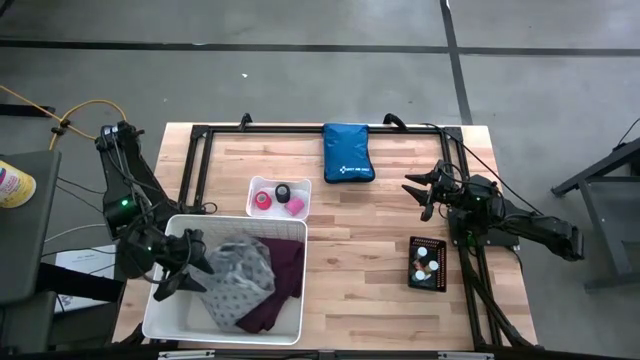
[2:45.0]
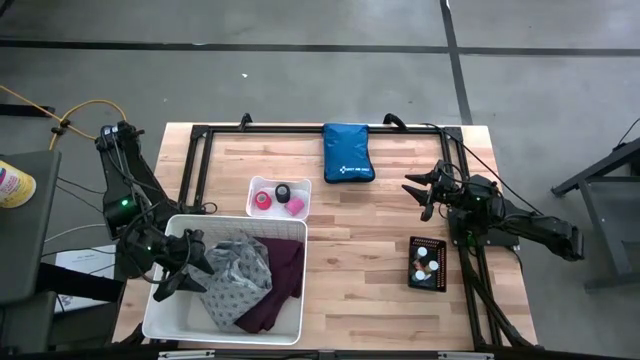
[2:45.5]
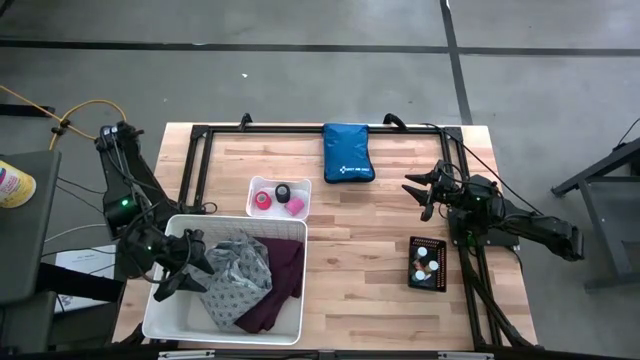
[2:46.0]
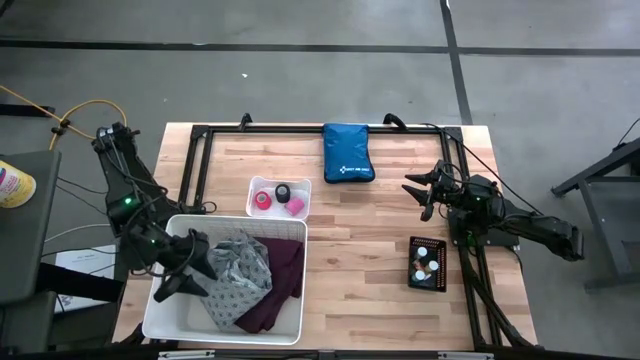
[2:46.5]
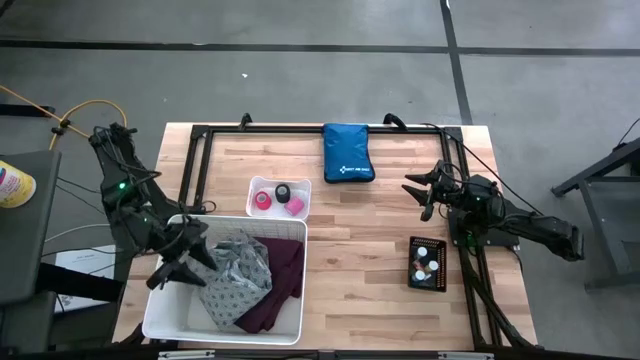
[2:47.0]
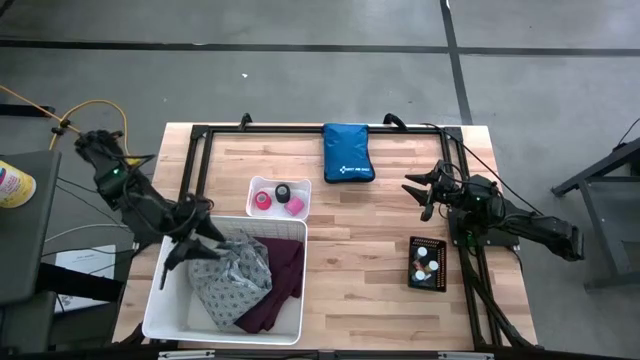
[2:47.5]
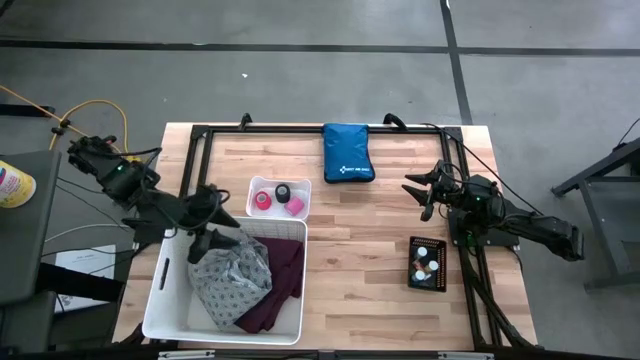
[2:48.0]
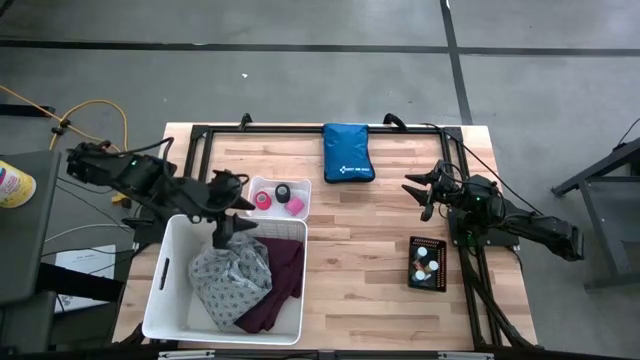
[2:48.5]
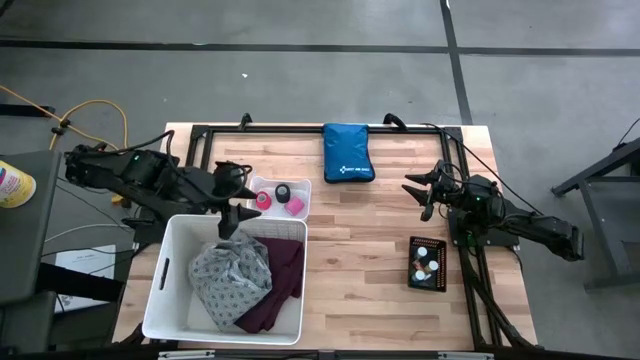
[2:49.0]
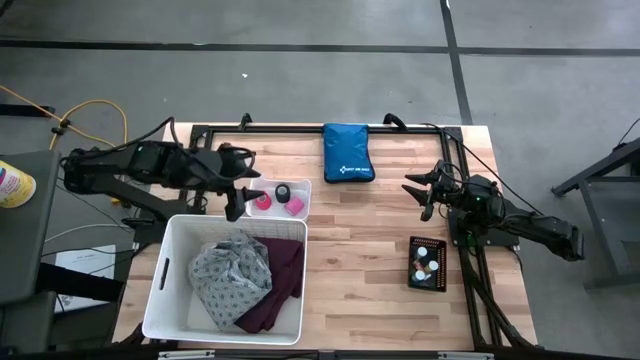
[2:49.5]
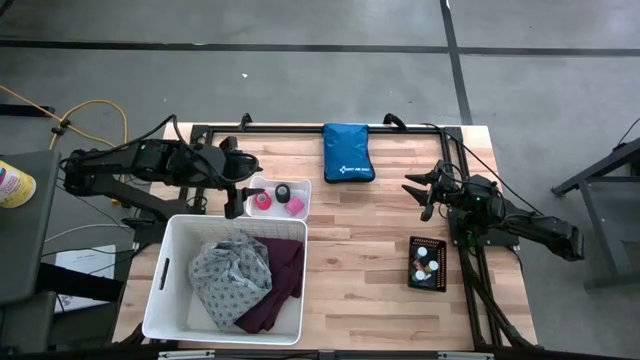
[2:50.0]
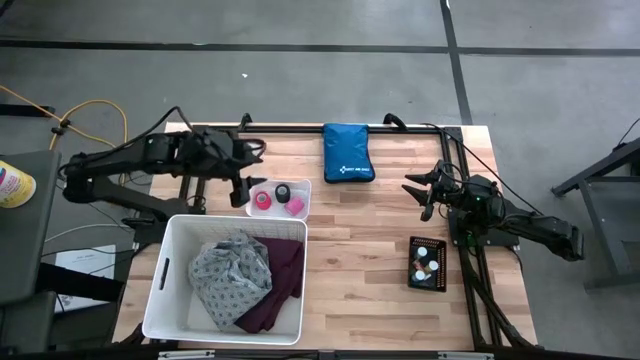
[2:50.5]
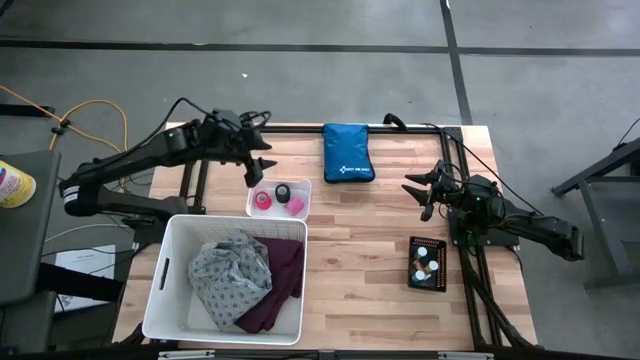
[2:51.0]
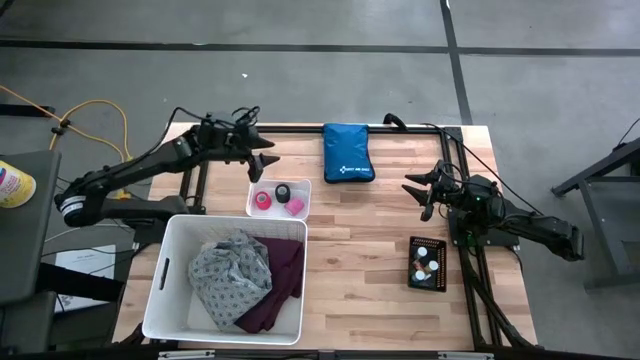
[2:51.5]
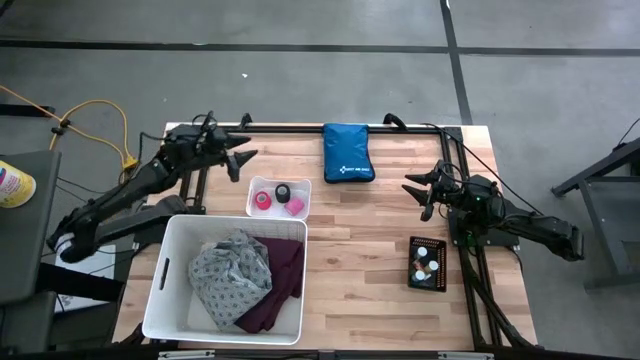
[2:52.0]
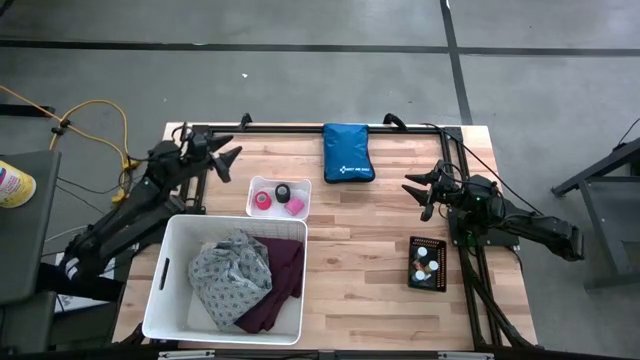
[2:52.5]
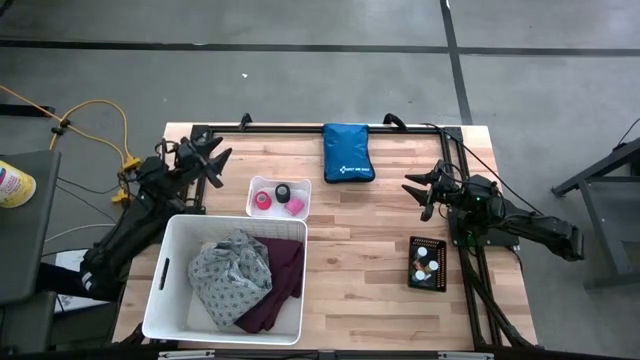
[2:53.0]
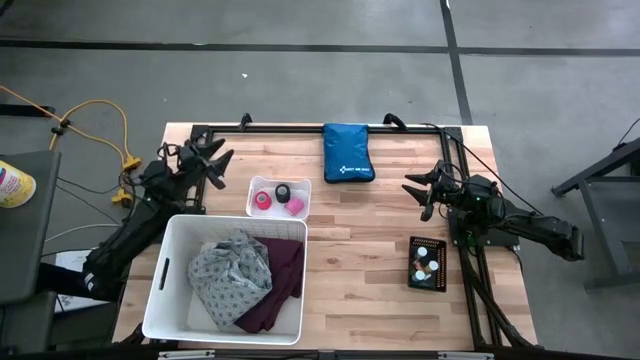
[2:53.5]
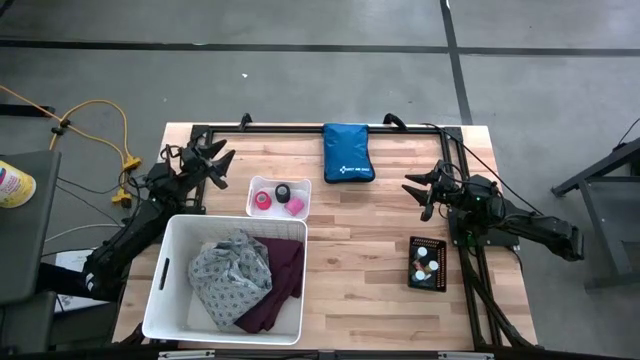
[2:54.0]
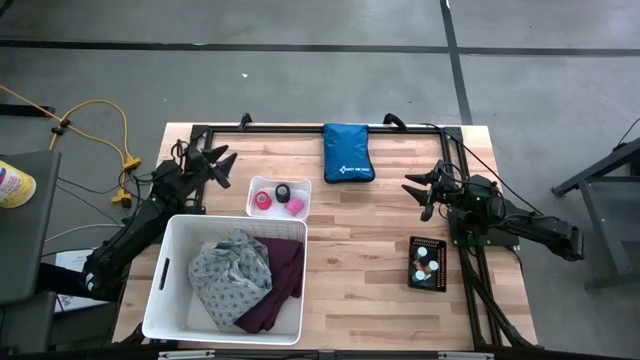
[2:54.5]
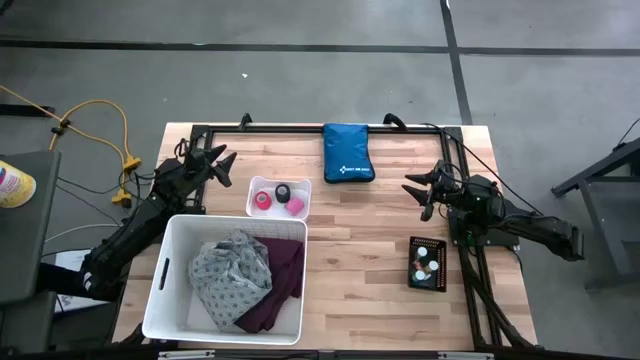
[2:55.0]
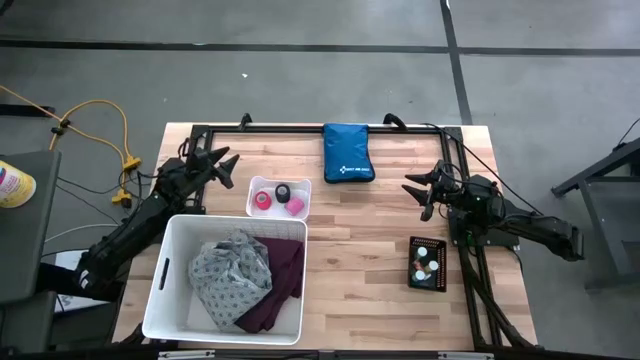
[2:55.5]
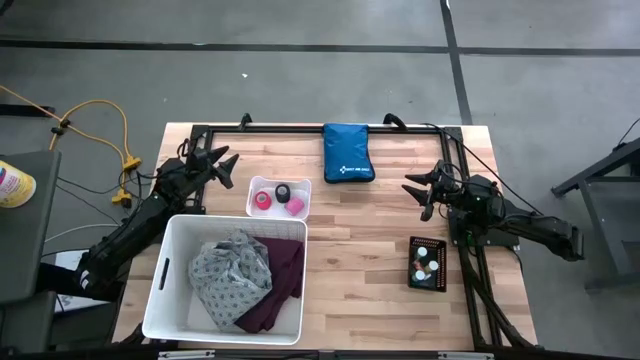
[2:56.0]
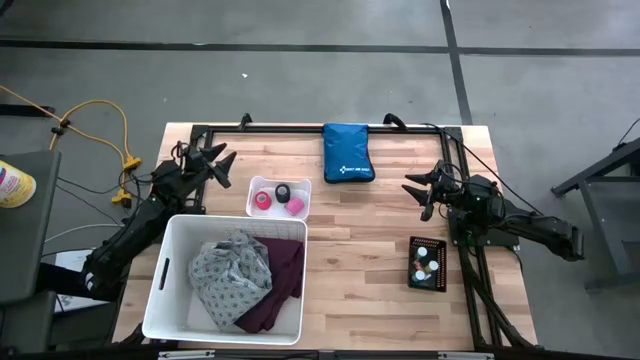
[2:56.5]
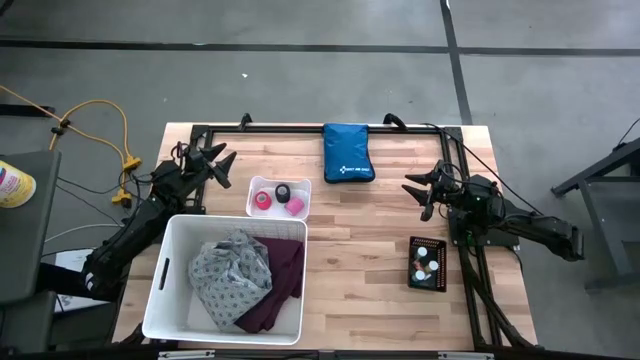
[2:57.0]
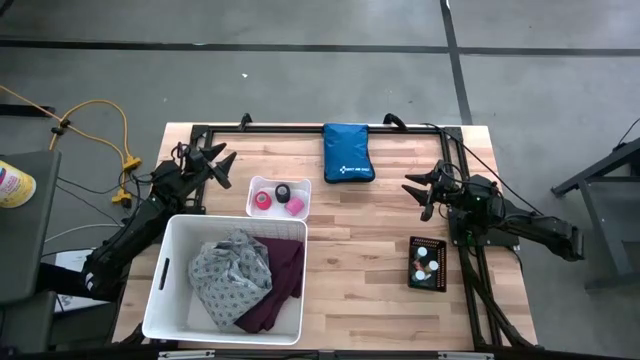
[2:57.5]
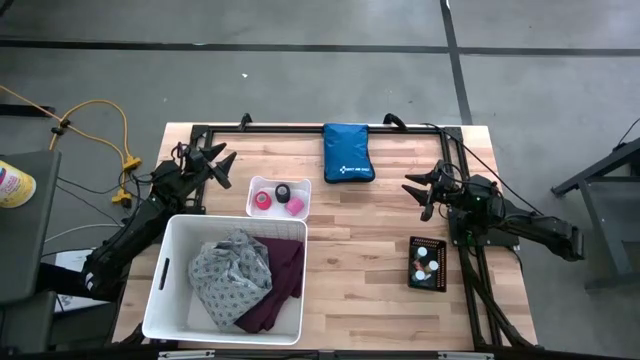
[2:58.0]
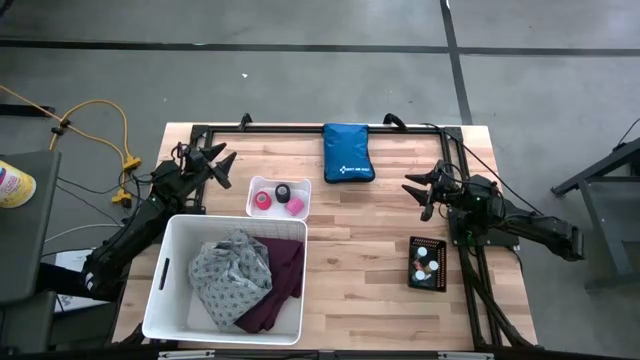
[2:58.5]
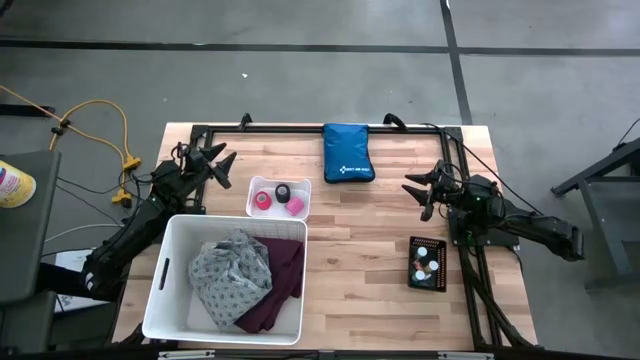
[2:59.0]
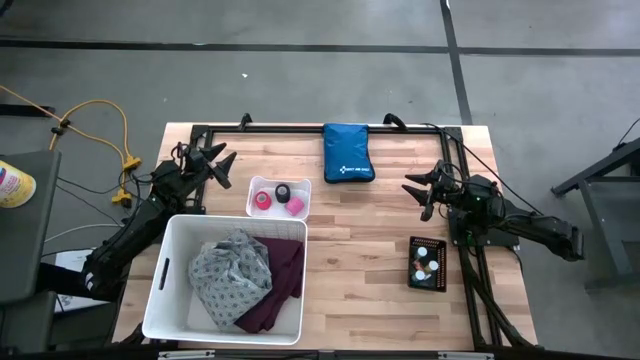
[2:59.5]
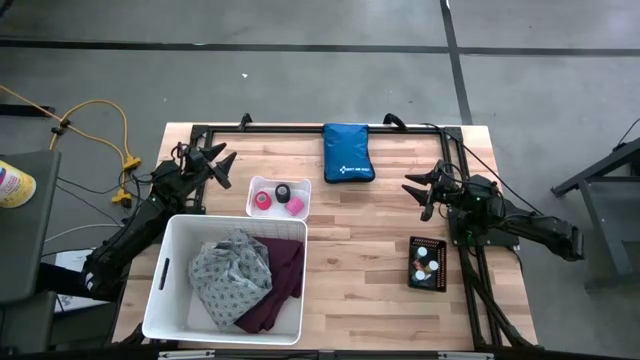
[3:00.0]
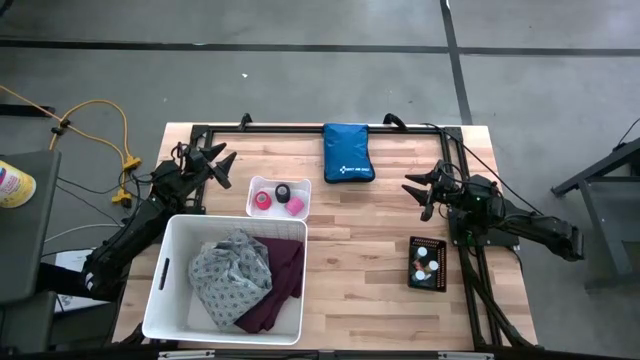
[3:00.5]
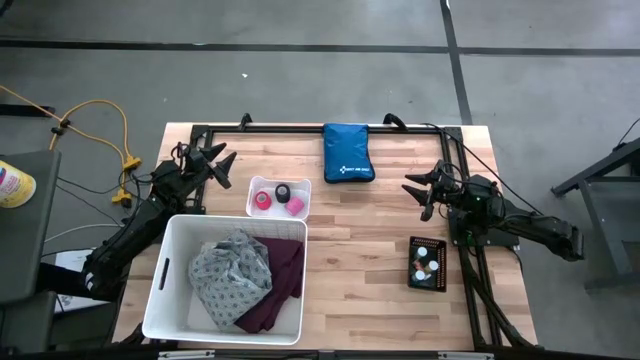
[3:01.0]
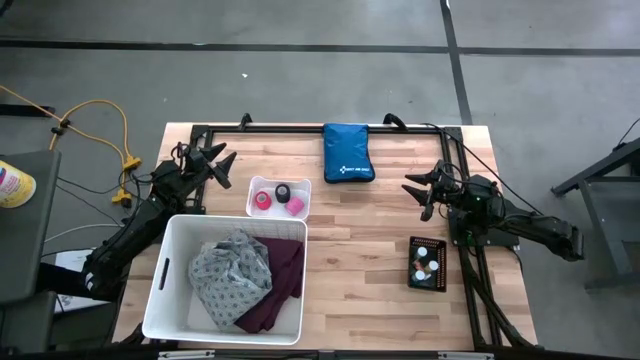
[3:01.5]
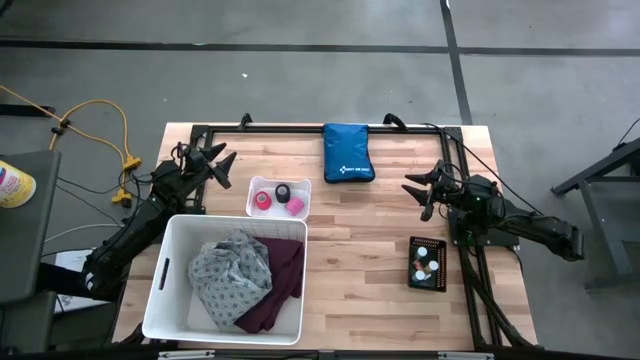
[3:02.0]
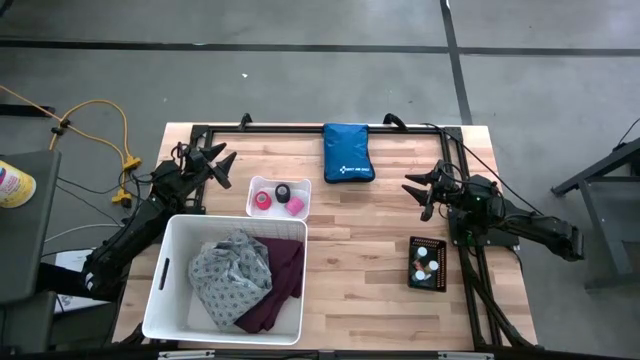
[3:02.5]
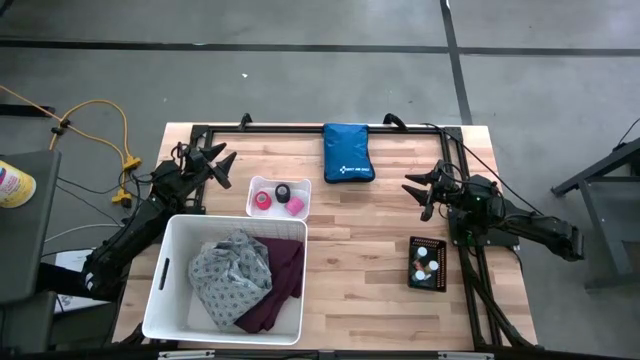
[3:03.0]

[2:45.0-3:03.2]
Task: Pick & place medical supplies in basket/bin
Return to Home Position

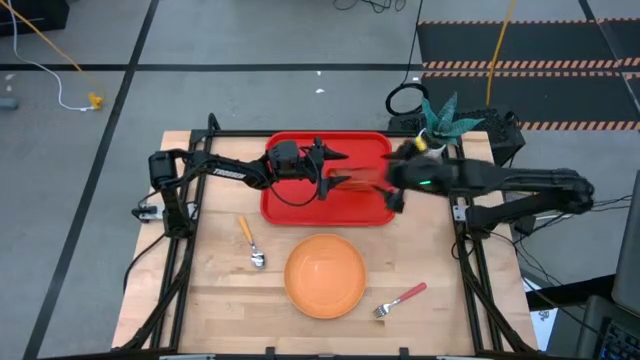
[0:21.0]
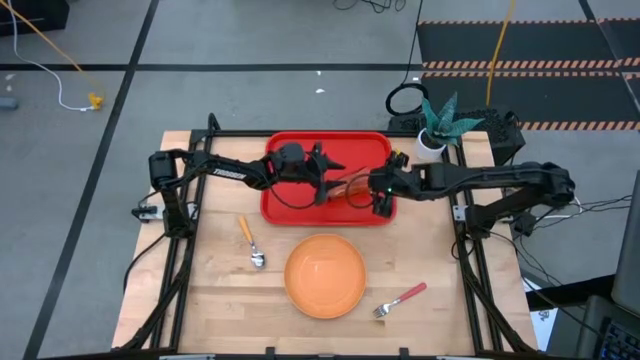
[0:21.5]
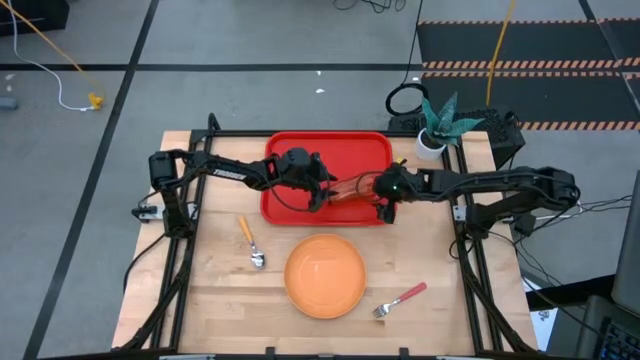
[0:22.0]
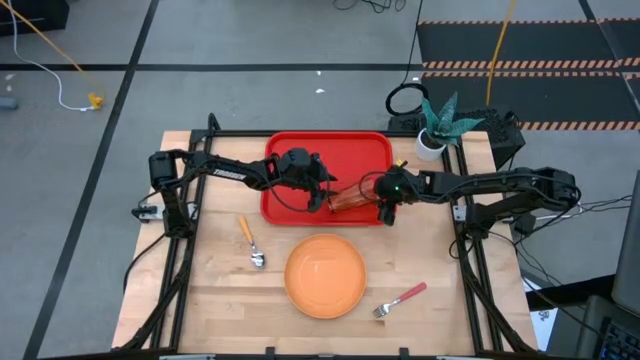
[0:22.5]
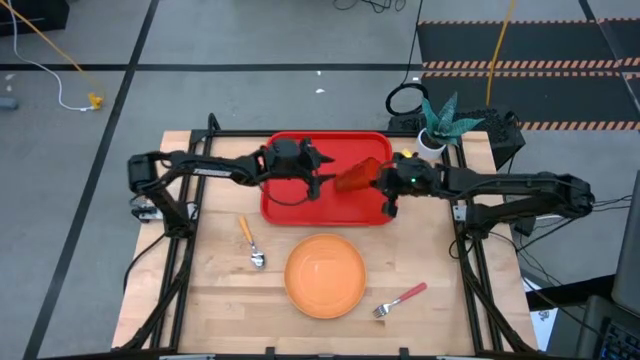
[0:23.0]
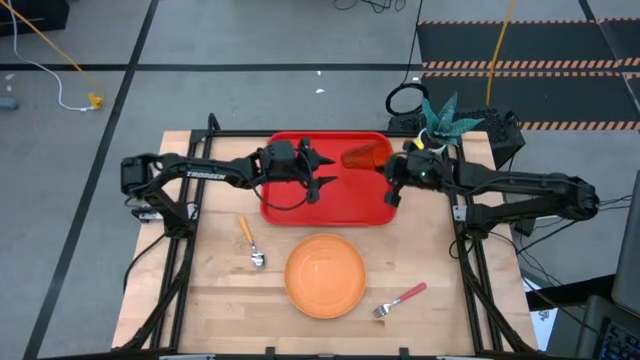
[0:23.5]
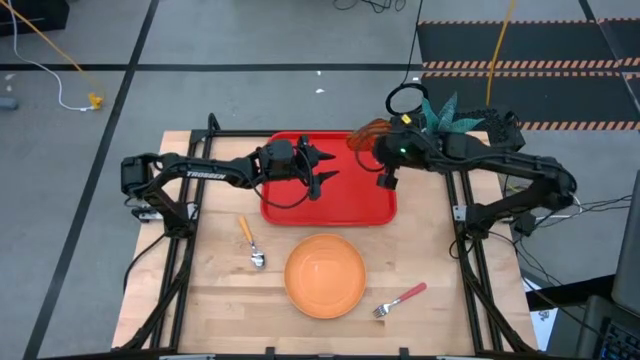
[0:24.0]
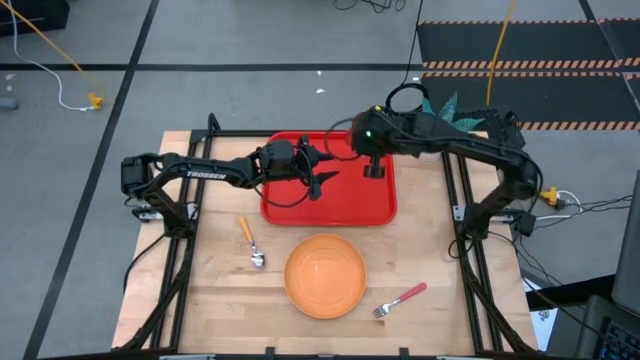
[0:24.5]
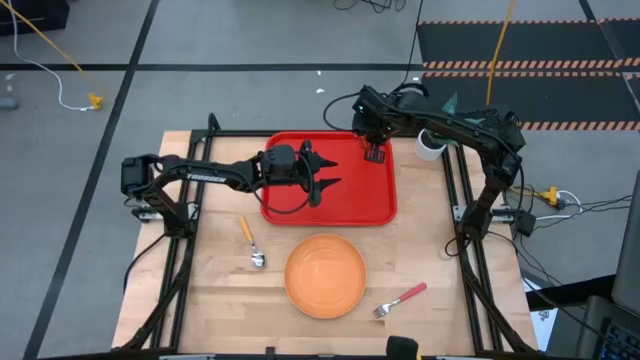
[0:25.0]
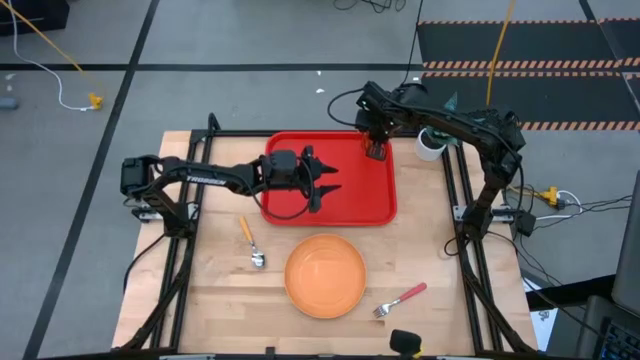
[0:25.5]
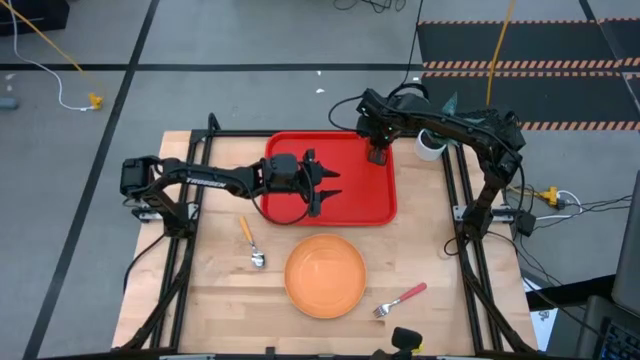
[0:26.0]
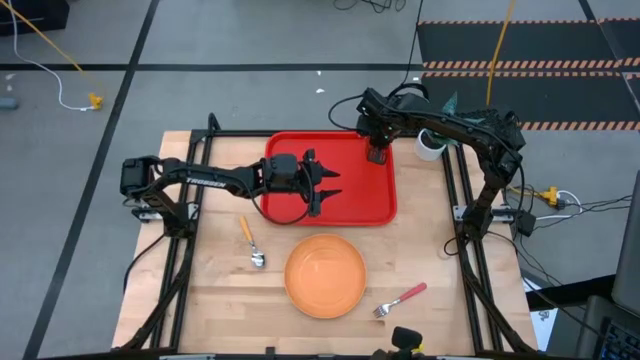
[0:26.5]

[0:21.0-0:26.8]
Task: Pick and place plate/cup/fork/spoon on tray
Put the brown cup on the red serving tray
